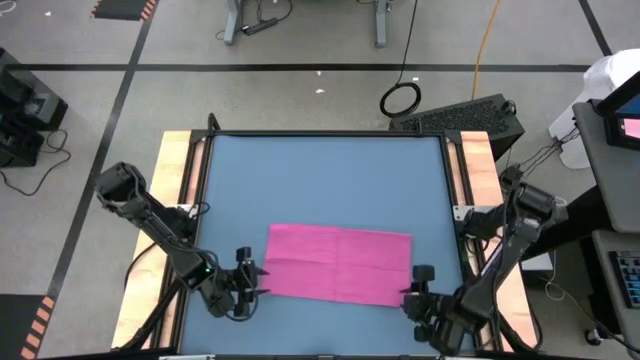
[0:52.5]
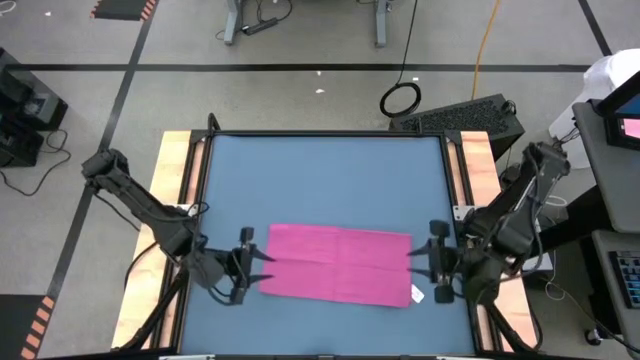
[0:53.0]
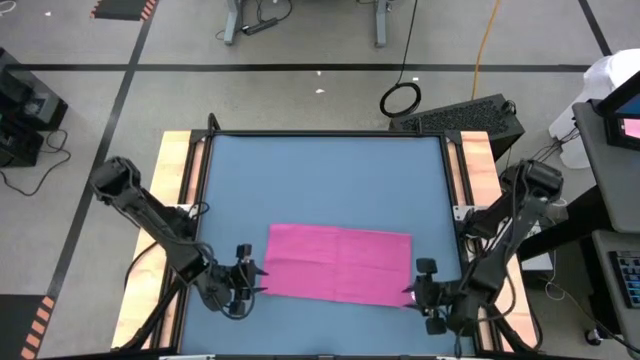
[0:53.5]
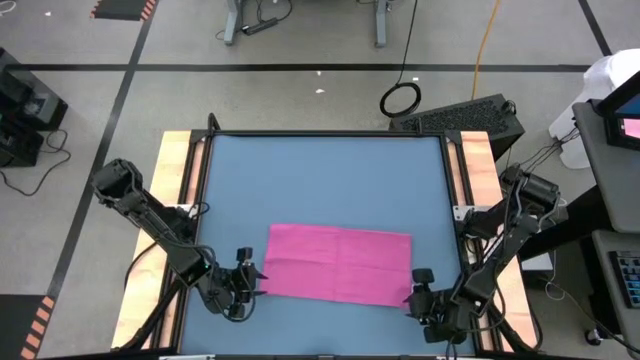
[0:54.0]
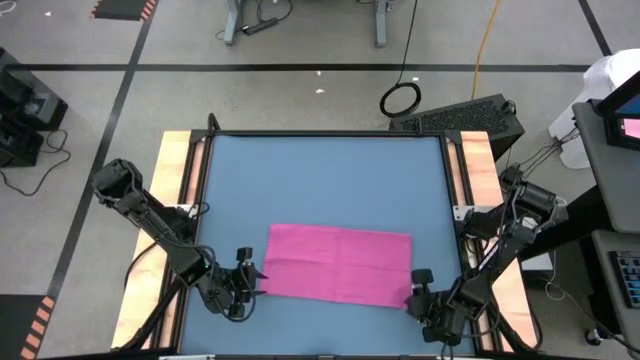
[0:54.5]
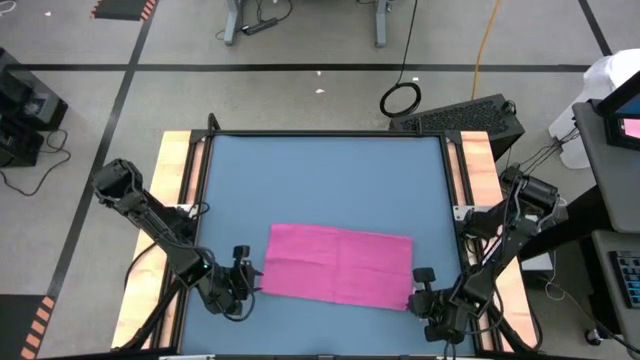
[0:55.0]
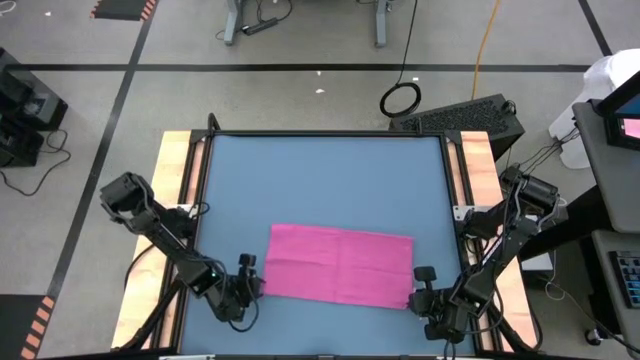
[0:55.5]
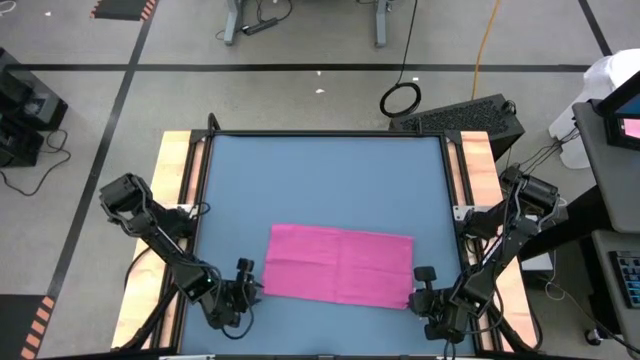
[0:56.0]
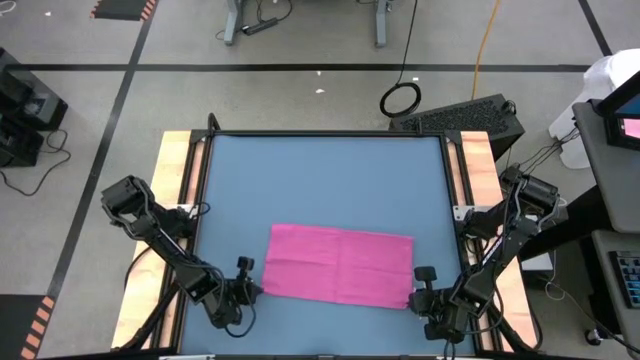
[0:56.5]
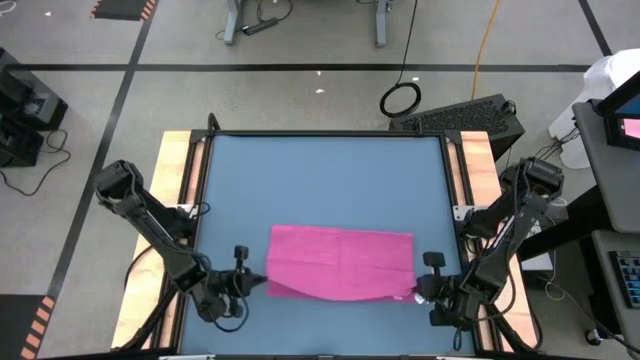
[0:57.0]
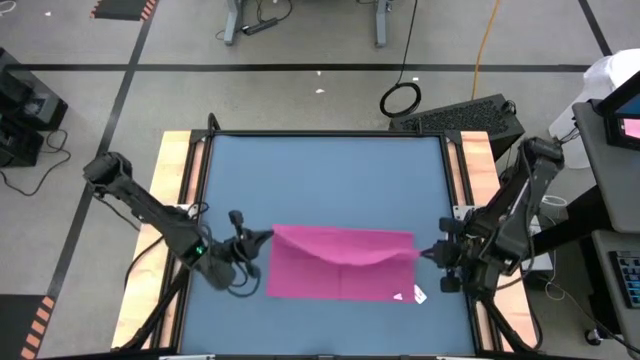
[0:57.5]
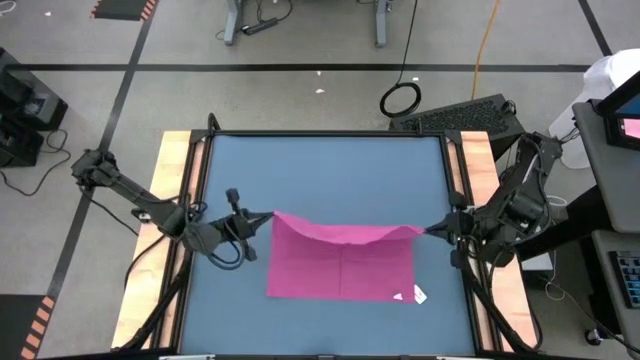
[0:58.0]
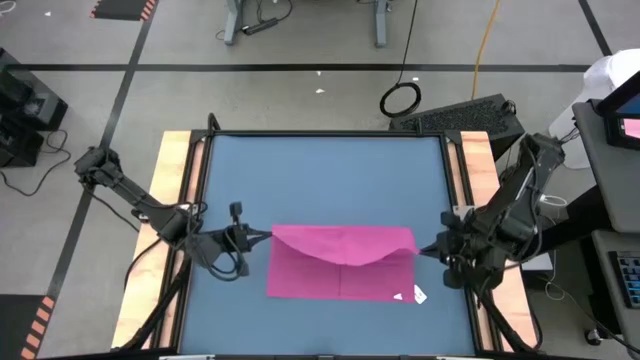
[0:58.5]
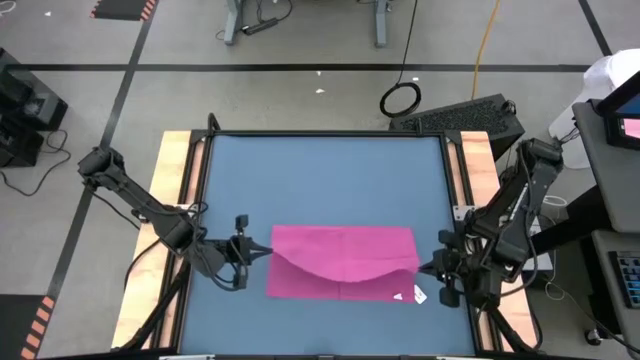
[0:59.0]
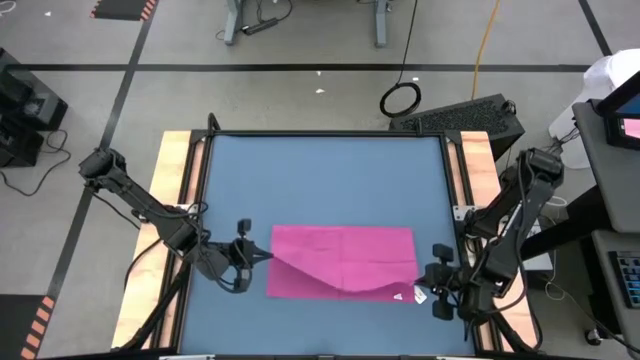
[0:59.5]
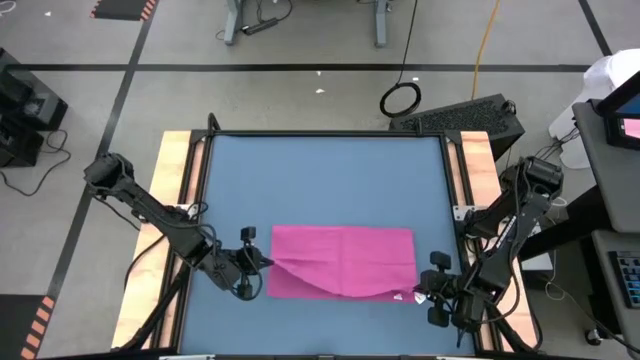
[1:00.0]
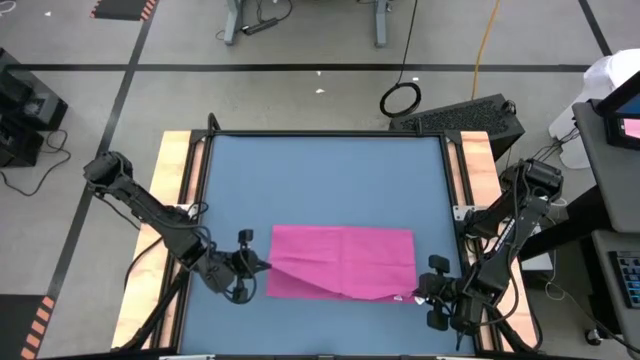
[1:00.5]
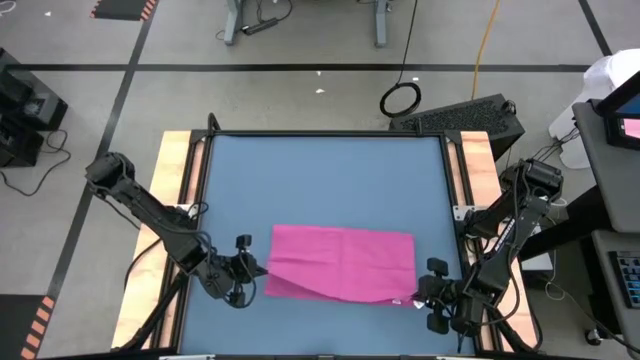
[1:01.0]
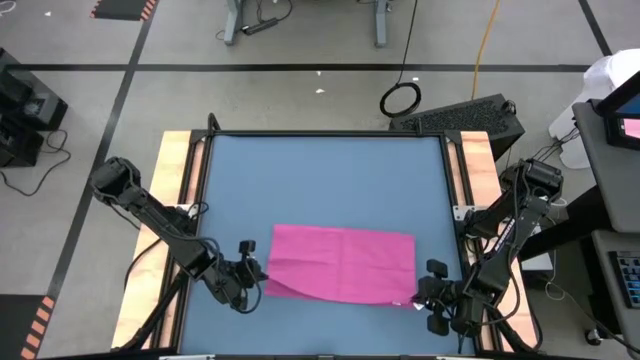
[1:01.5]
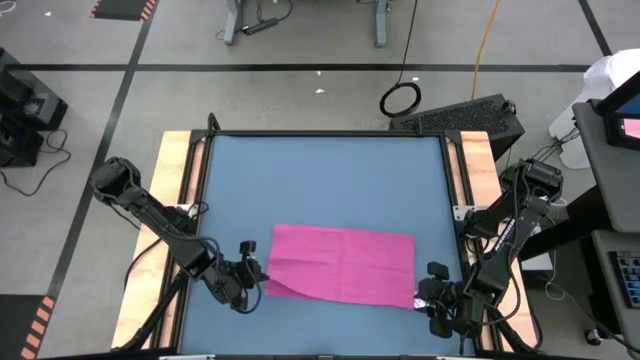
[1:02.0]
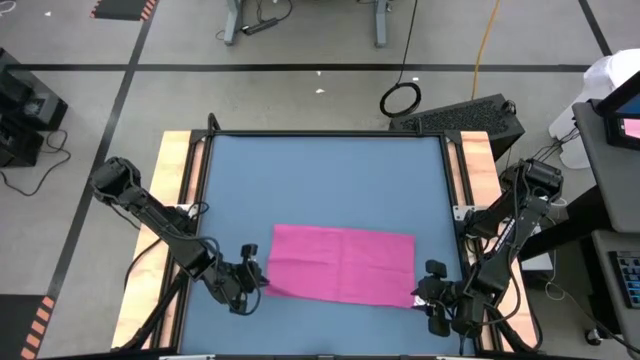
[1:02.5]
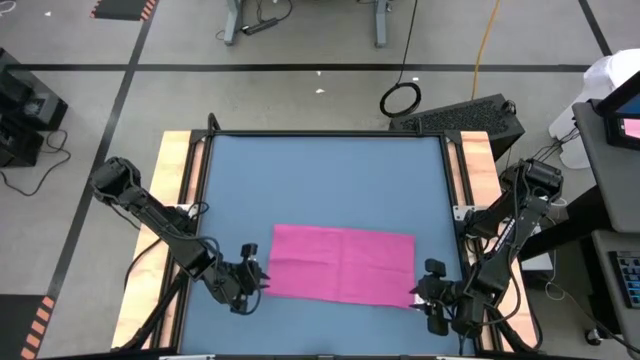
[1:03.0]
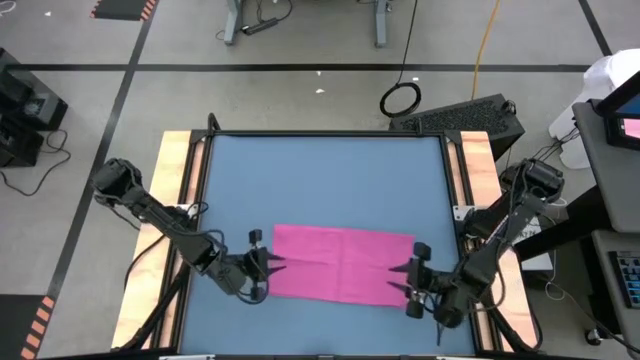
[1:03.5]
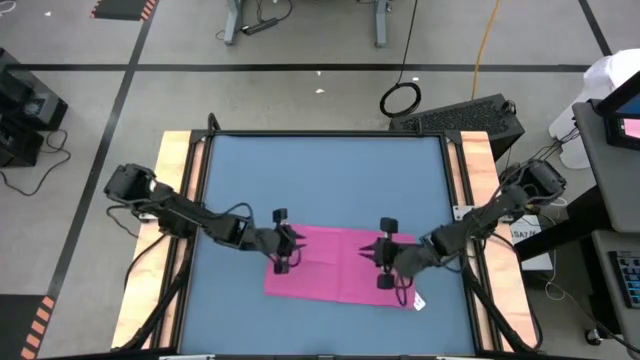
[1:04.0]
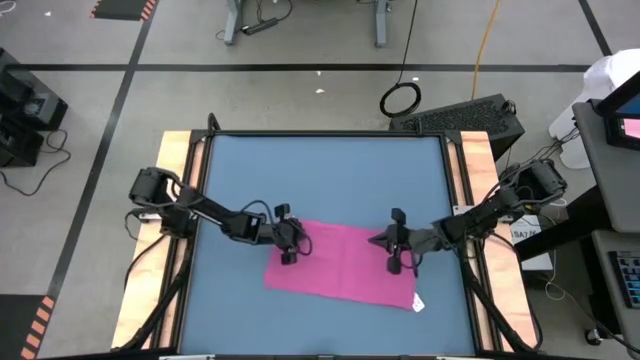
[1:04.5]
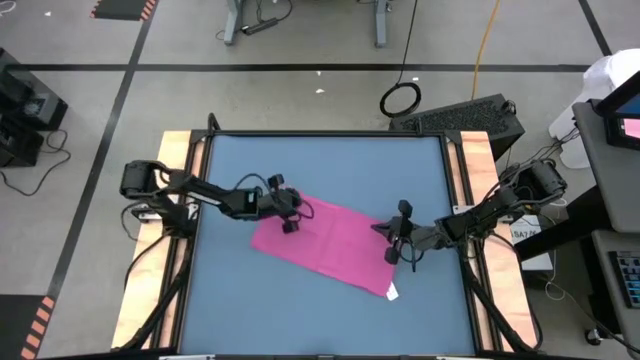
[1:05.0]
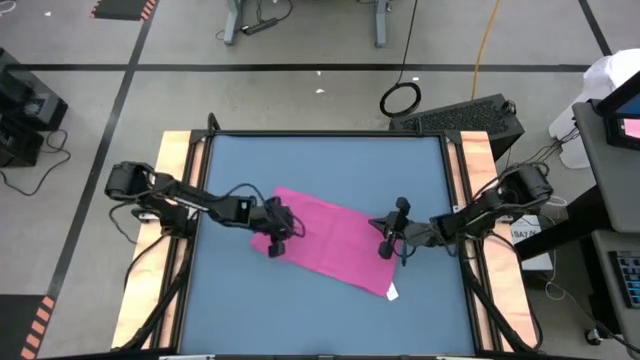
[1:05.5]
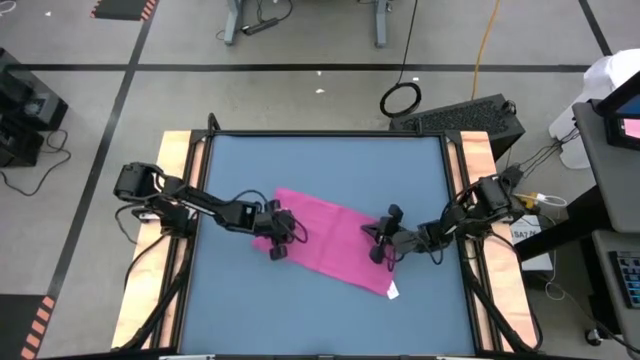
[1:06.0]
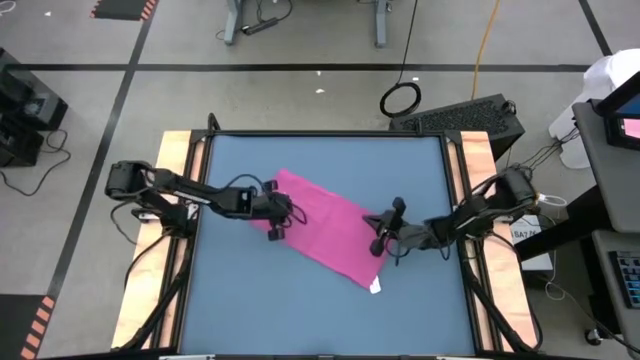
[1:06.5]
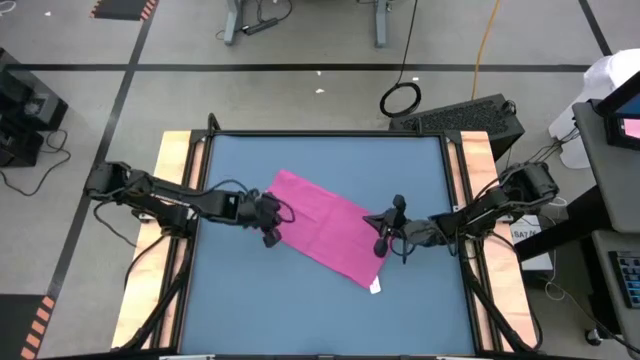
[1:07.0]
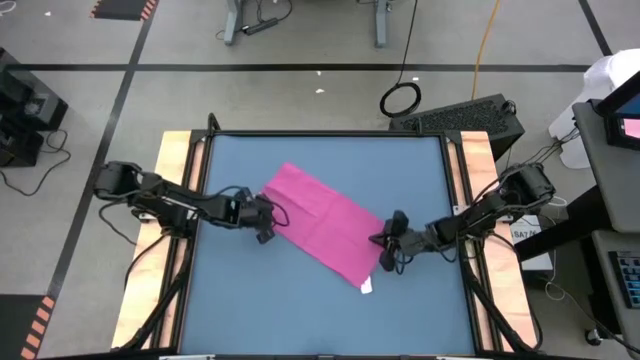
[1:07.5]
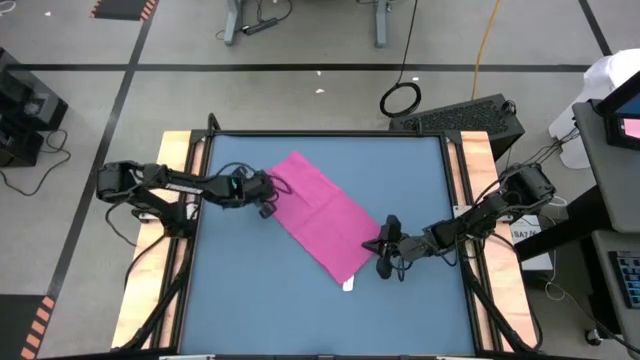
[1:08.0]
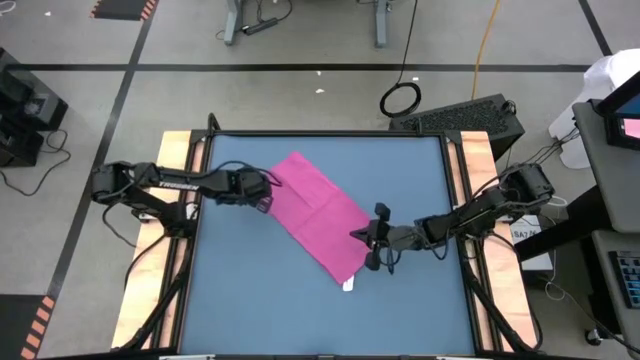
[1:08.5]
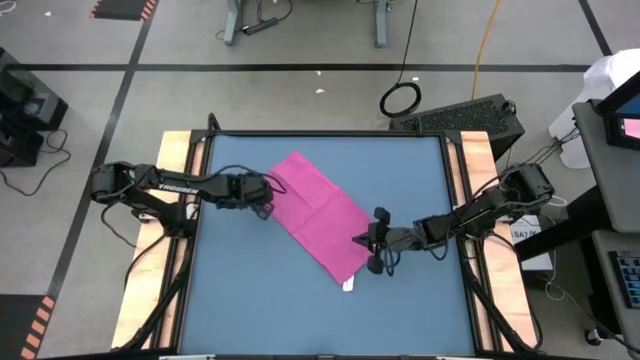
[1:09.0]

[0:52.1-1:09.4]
Task: Roll towel into tight, uniform cylinder
Fold the pink towel

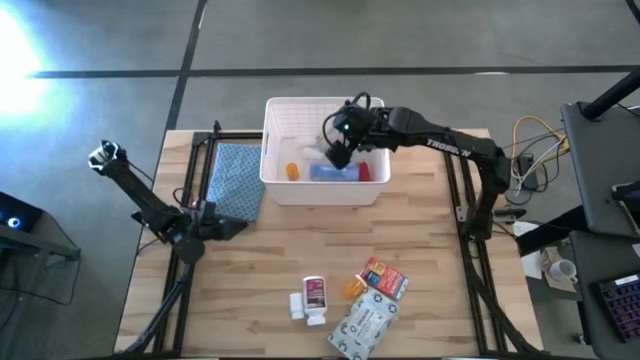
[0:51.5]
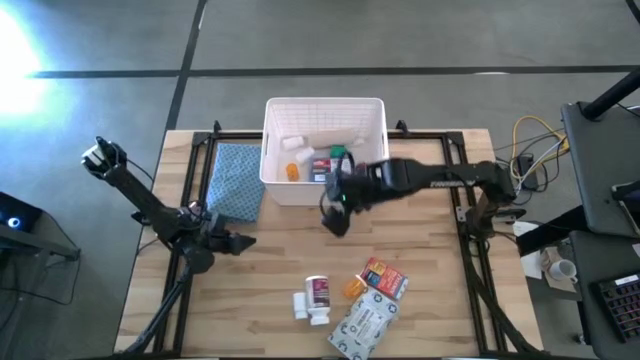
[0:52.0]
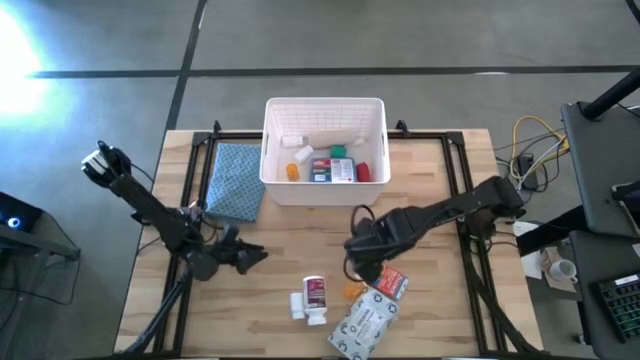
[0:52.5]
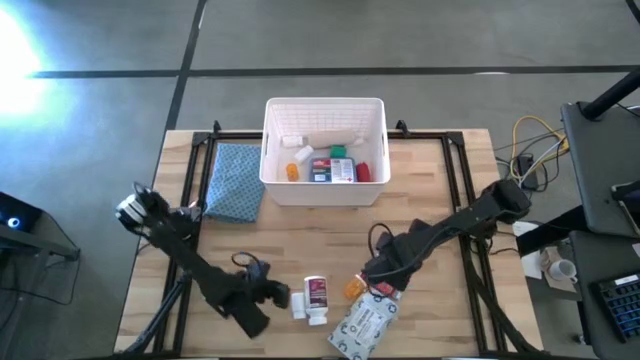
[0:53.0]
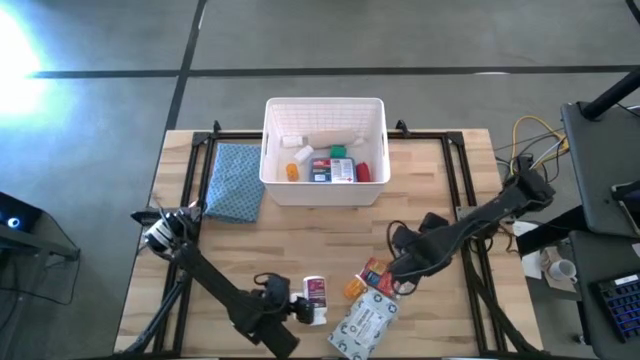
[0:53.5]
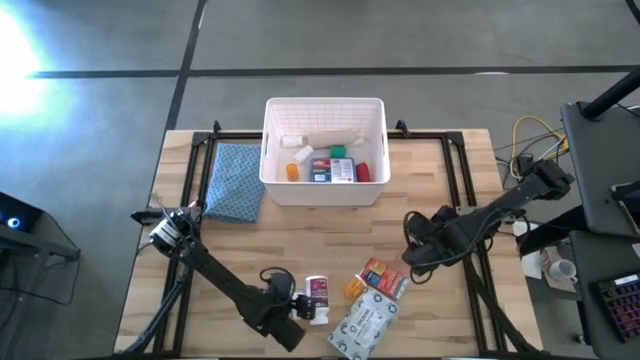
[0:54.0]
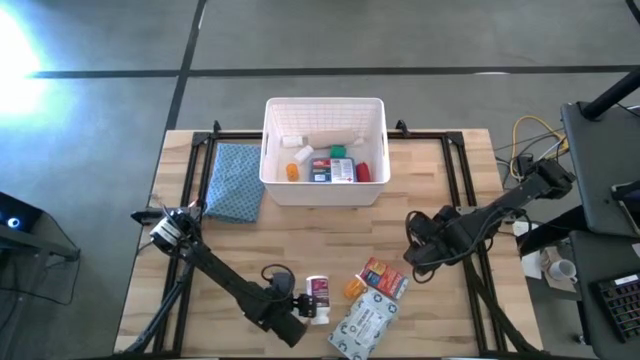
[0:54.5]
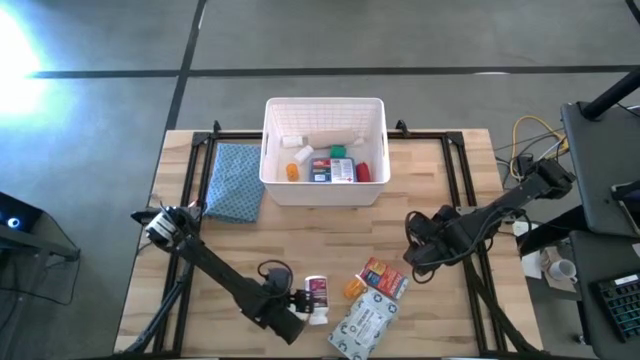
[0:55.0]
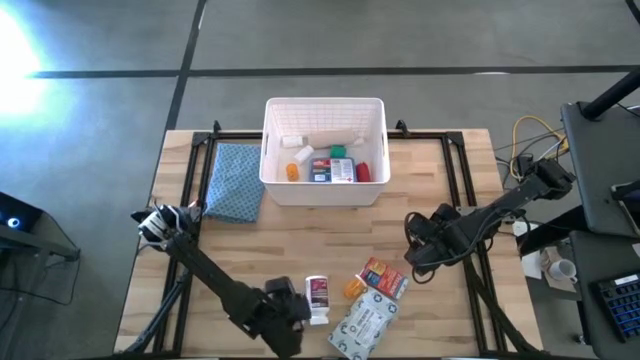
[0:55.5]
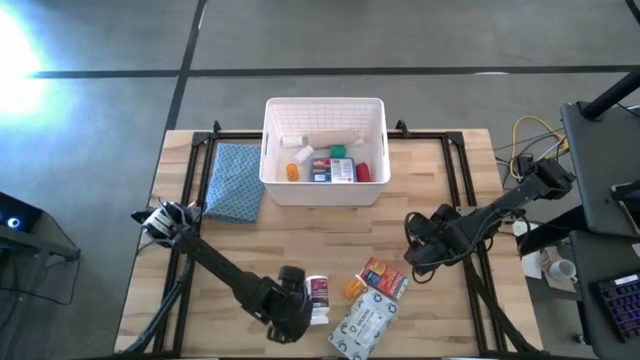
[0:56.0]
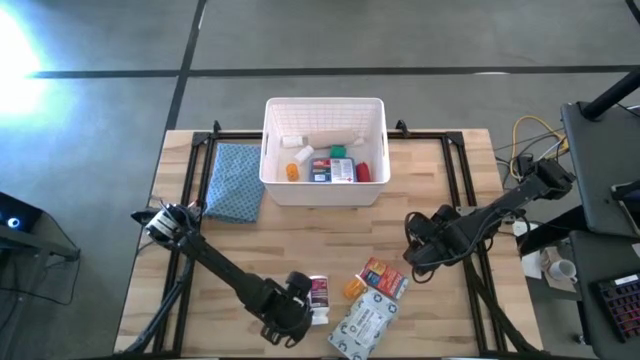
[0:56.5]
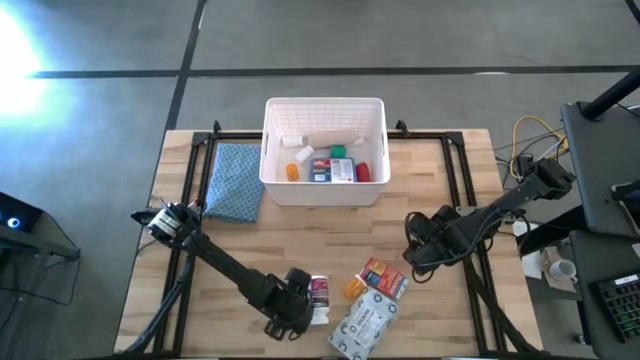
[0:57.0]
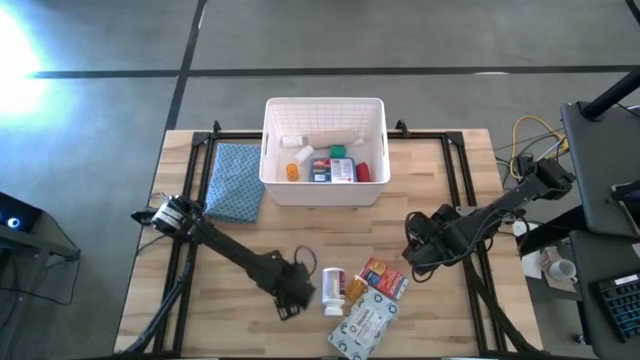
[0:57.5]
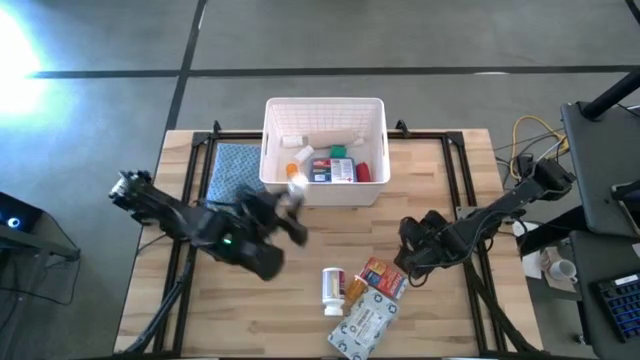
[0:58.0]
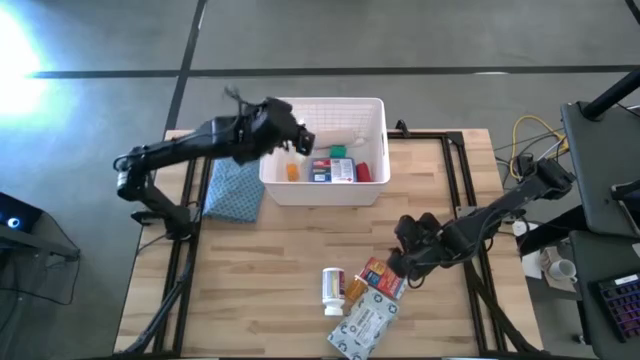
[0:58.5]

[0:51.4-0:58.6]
Task: Pick & place medical supplies in basket/bin
Put the white pill bottle into the white bin
